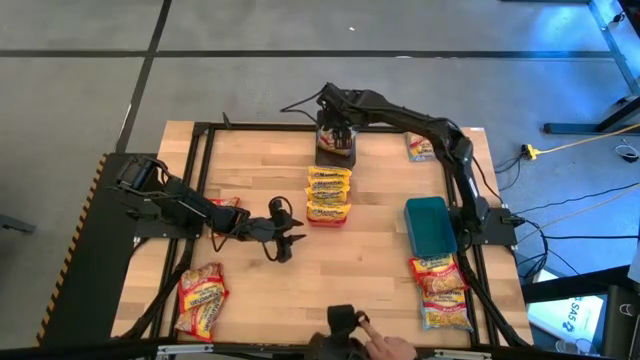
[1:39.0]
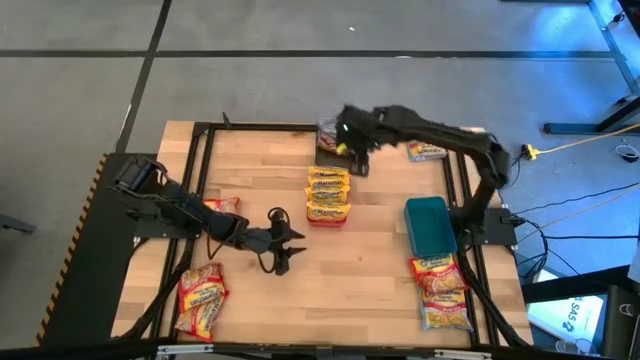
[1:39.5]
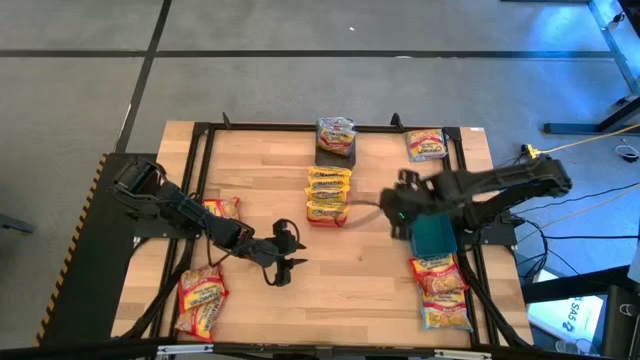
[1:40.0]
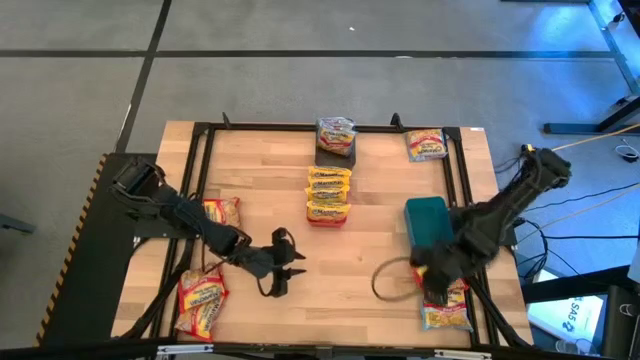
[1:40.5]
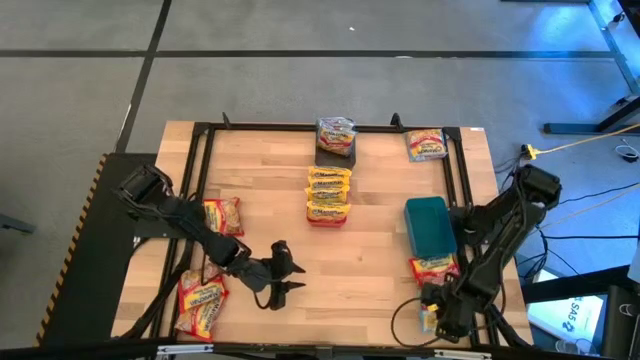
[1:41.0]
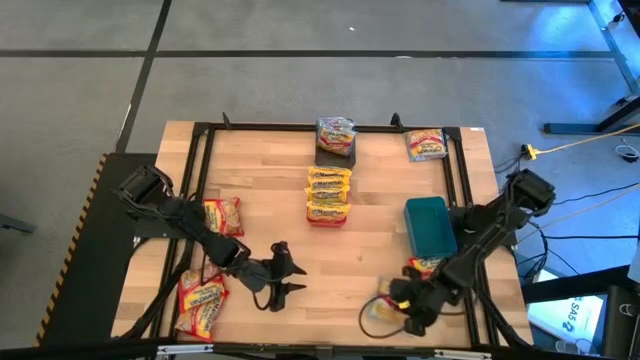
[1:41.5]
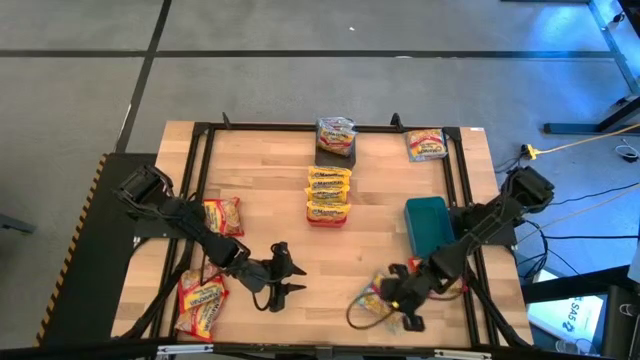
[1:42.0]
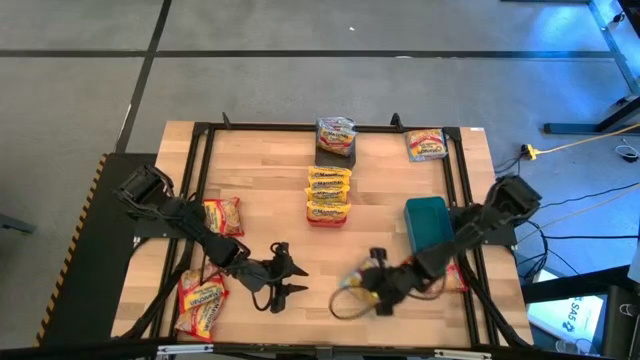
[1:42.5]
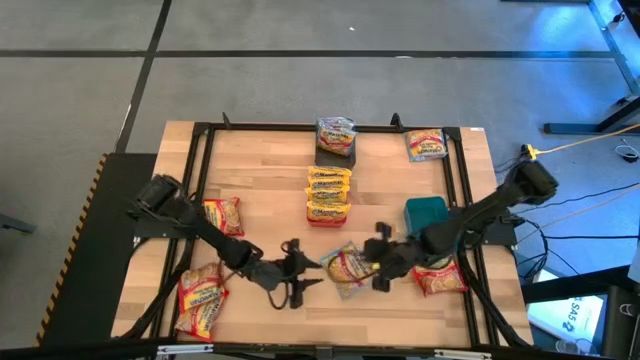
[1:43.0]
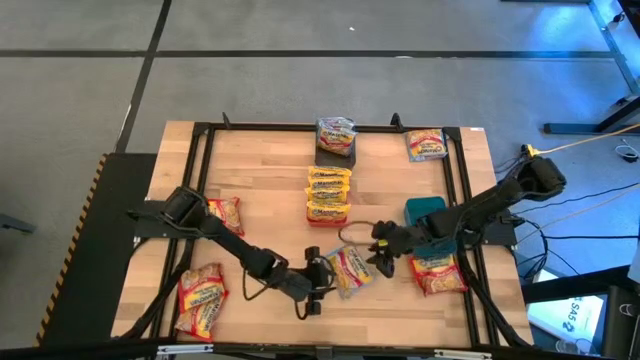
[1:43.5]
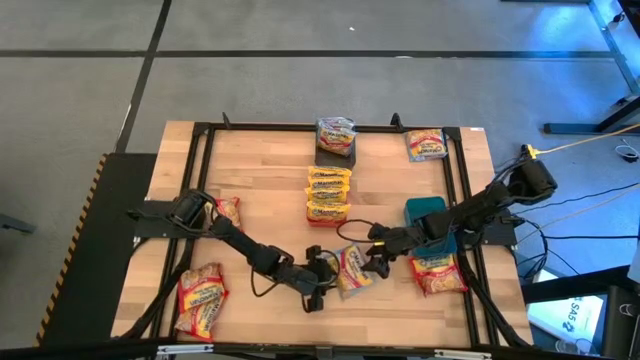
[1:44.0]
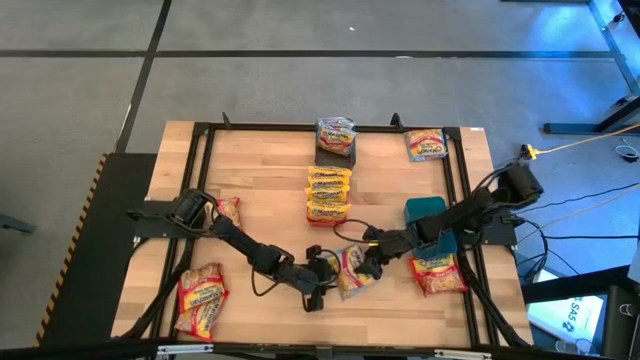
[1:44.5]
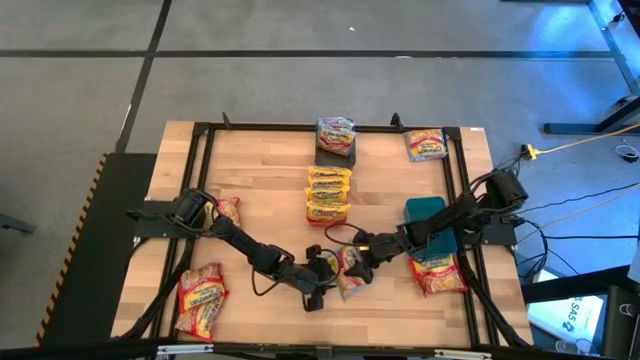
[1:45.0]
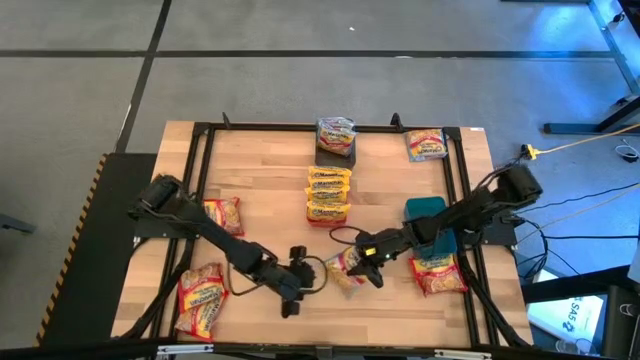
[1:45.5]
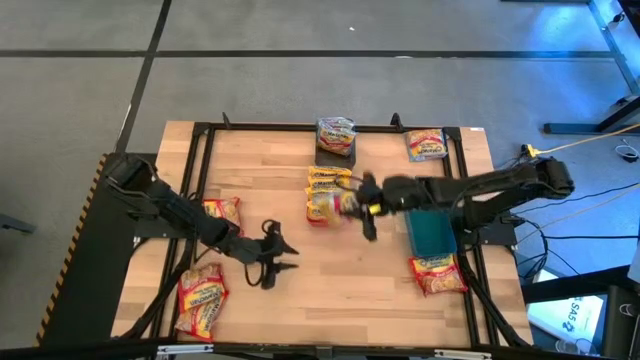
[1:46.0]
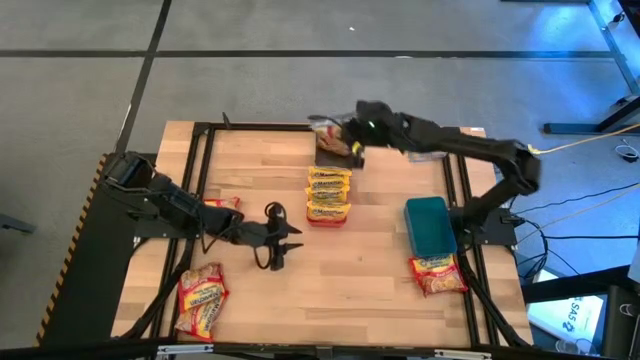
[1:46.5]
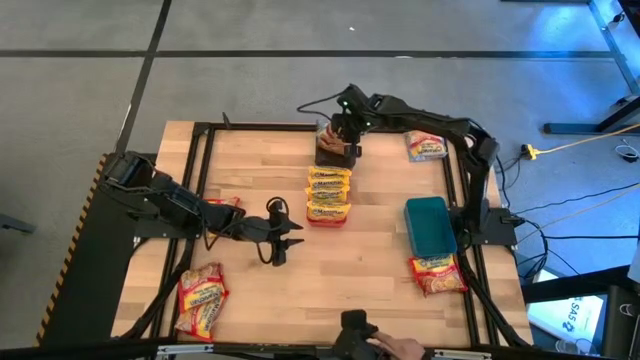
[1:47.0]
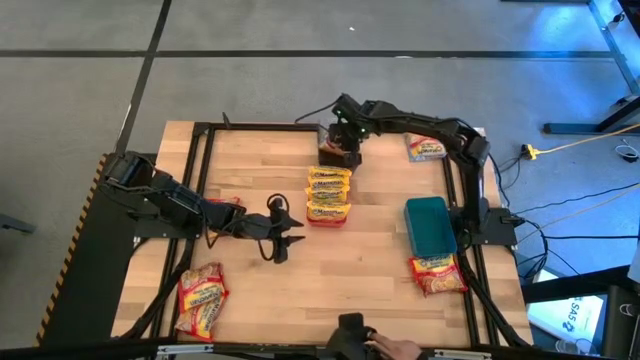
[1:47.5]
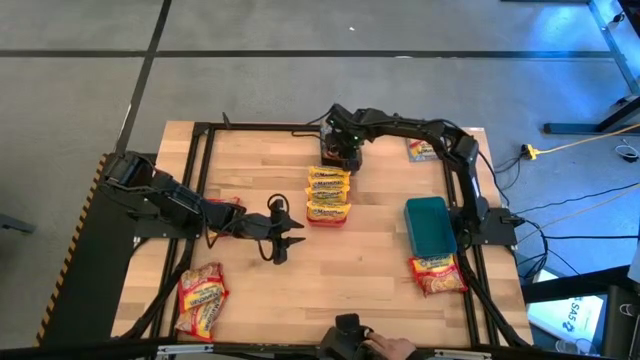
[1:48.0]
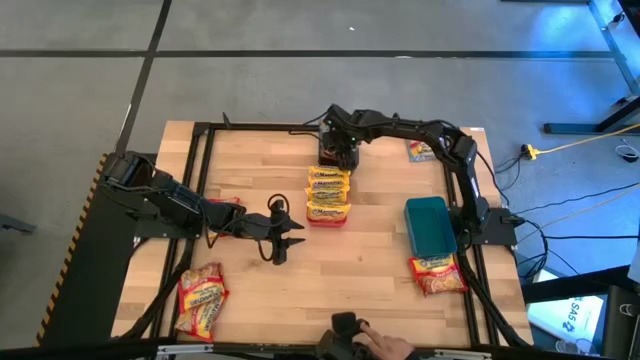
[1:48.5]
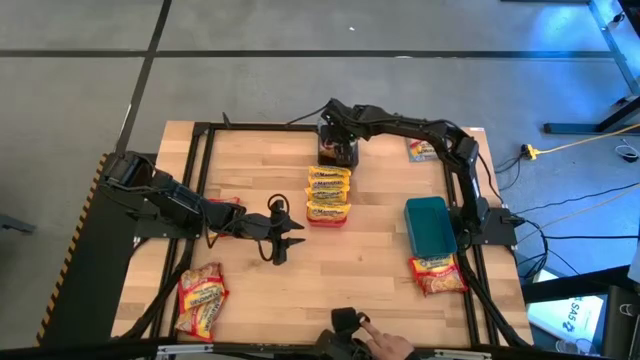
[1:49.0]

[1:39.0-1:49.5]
Task: Sort Maruchan noodles
Put the blue noodle pack into the black bin

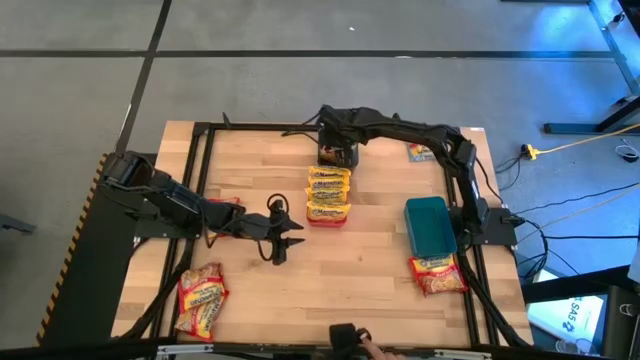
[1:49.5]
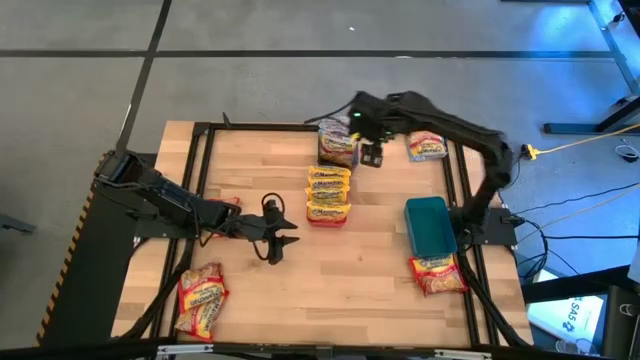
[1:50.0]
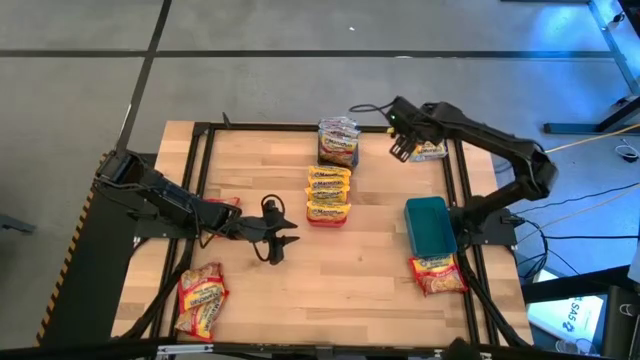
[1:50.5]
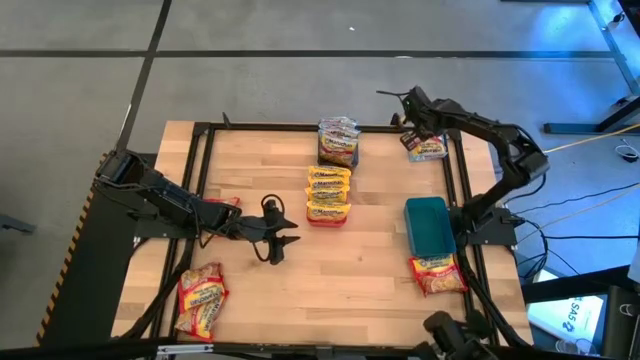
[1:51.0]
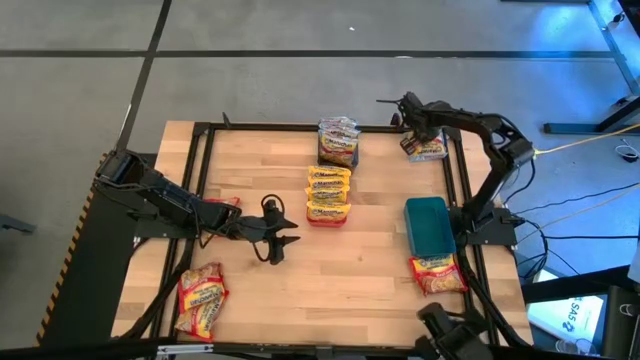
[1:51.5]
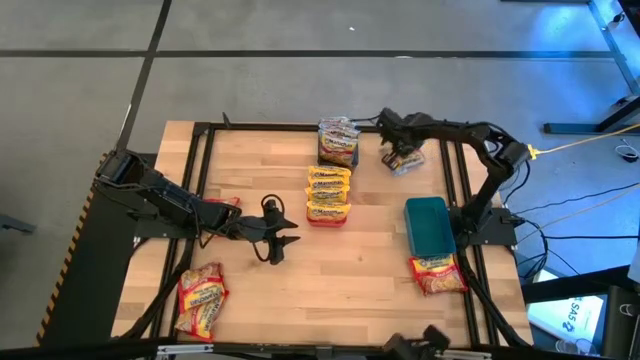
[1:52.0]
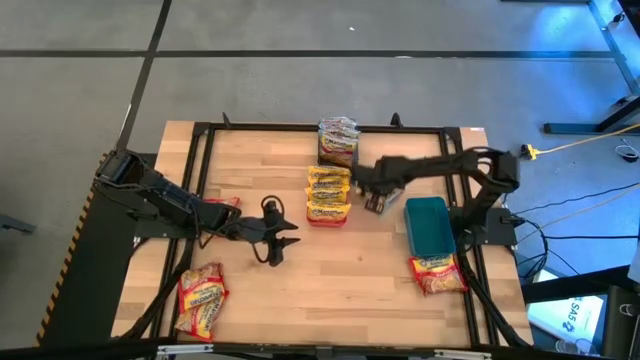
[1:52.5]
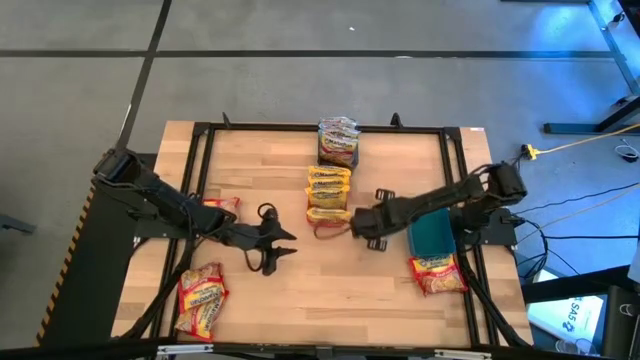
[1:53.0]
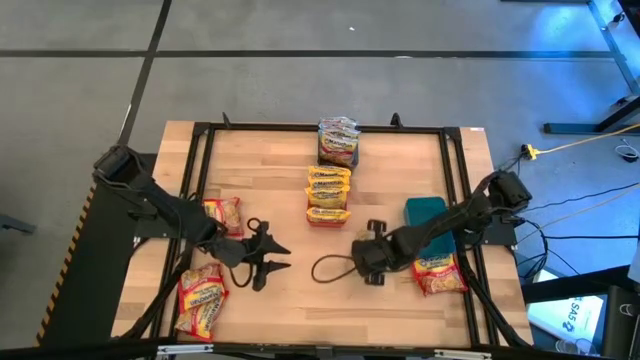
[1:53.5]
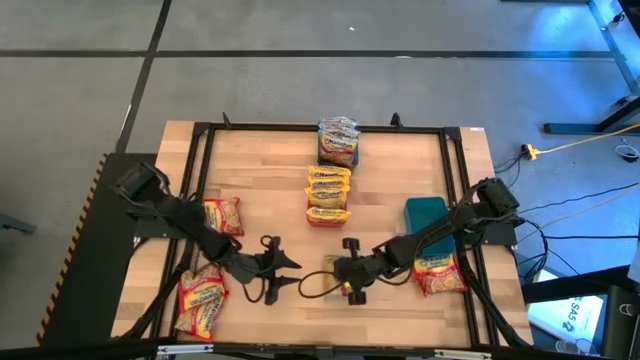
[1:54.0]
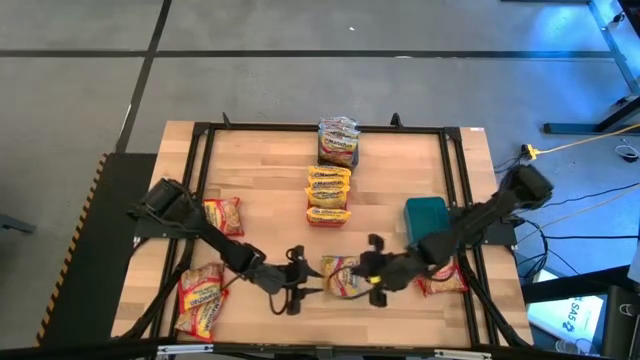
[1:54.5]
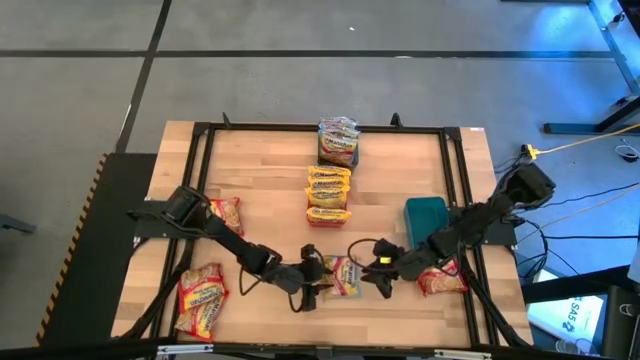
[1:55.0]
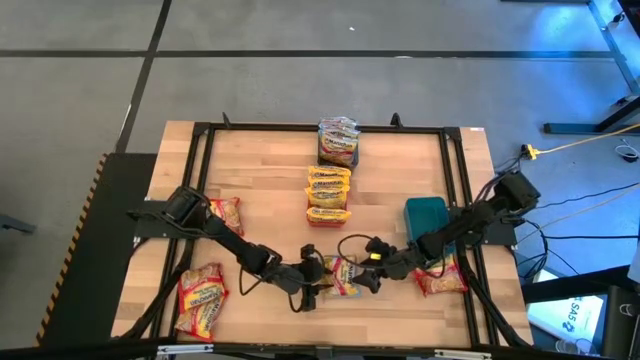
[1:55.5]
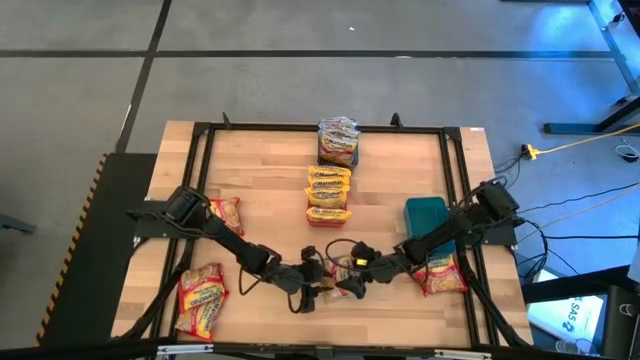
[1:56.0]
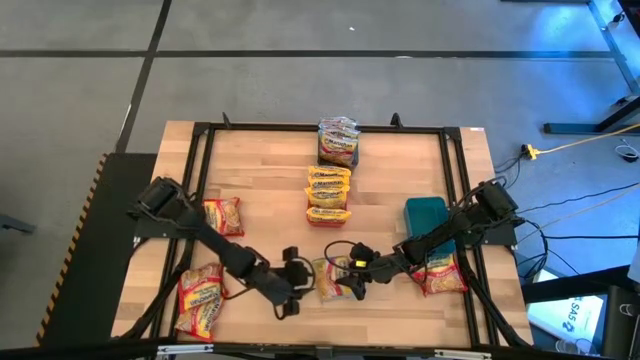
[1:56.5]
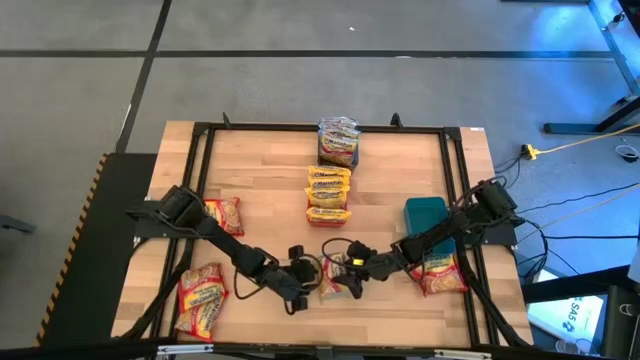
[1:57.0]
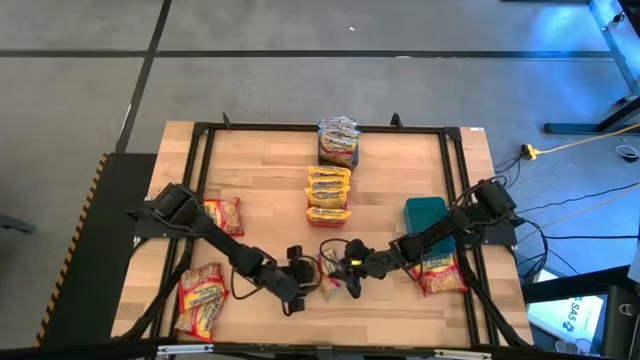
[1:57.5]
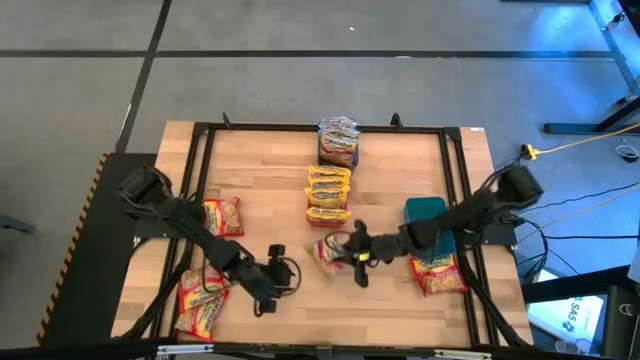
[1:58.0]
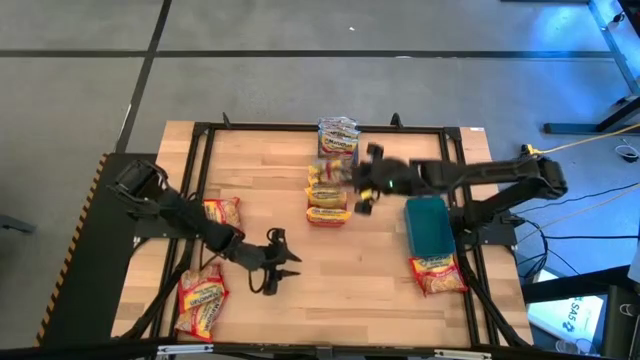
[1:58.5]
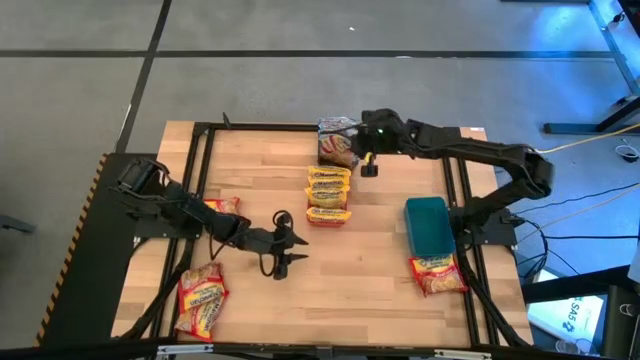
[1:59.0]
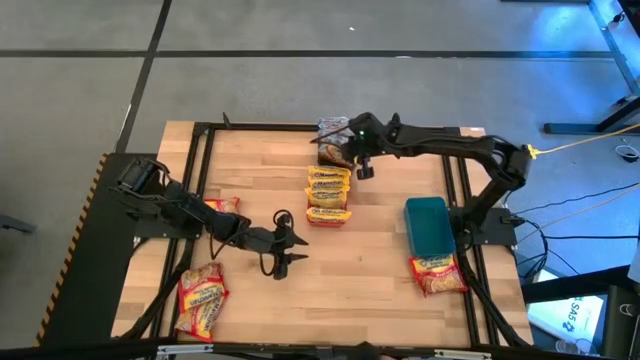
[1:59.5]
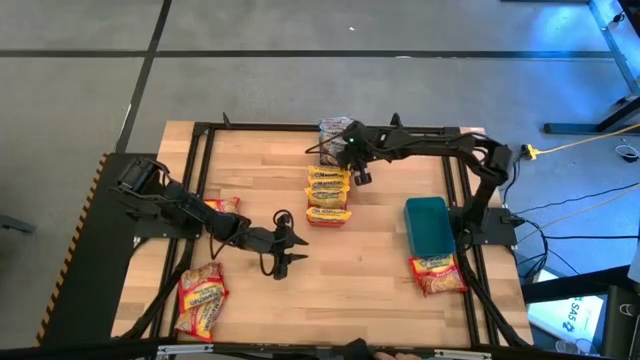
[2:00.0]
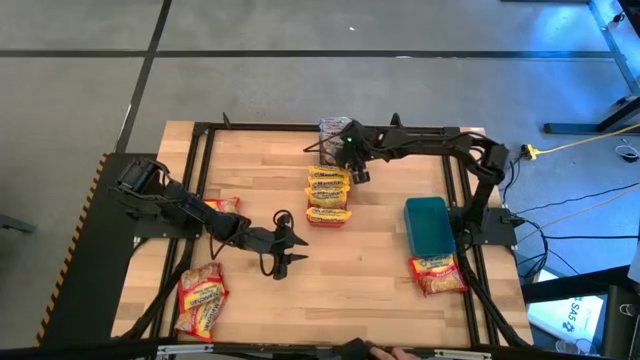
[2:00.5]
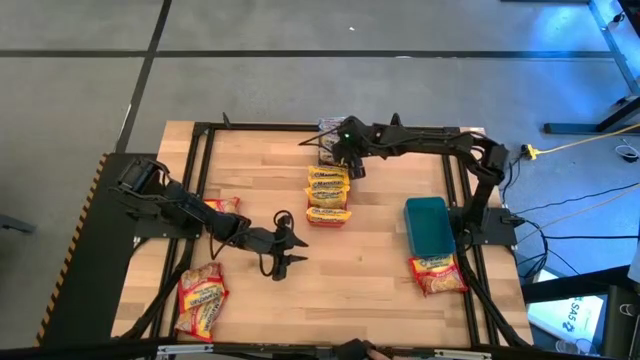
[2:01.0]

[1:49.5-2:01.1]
Put the blue noodle pack into the black bin
